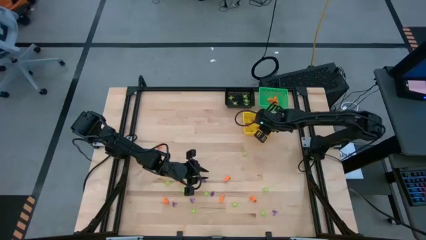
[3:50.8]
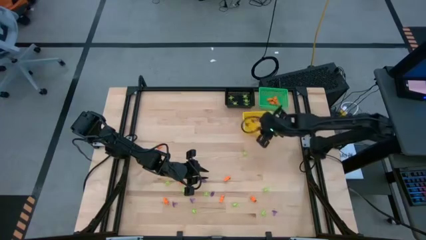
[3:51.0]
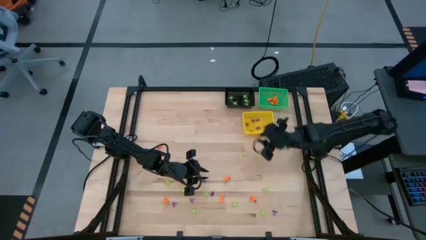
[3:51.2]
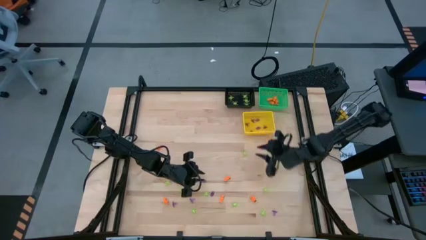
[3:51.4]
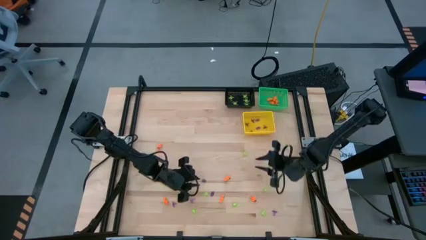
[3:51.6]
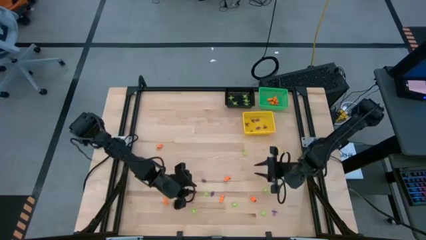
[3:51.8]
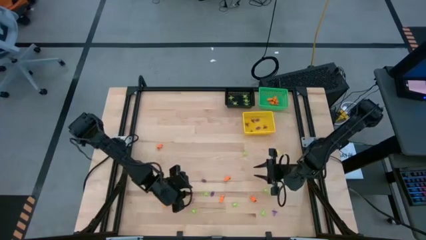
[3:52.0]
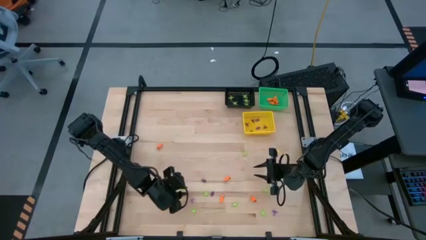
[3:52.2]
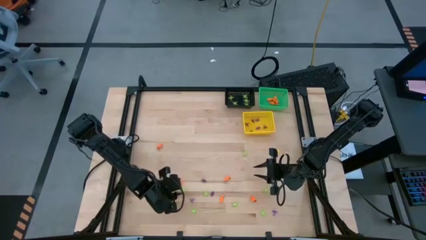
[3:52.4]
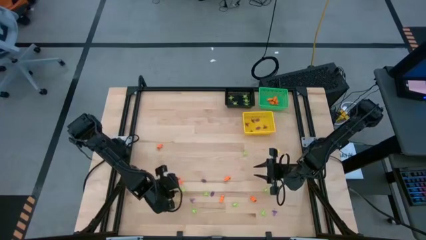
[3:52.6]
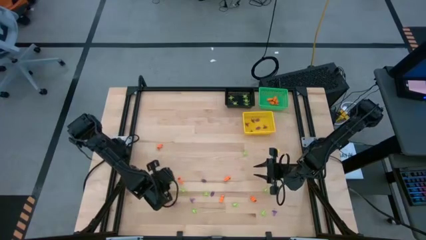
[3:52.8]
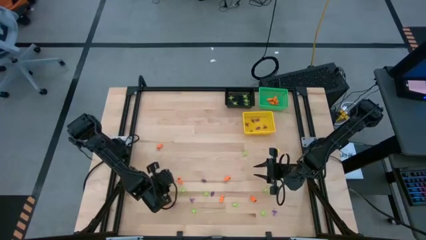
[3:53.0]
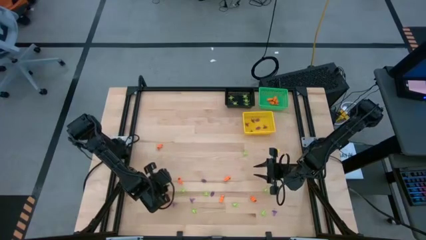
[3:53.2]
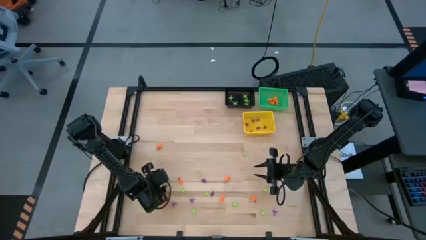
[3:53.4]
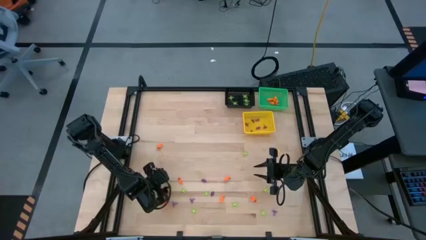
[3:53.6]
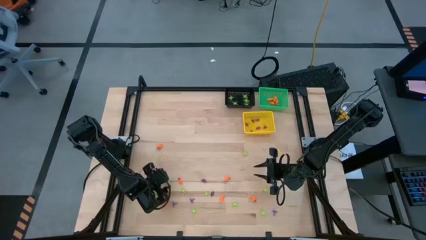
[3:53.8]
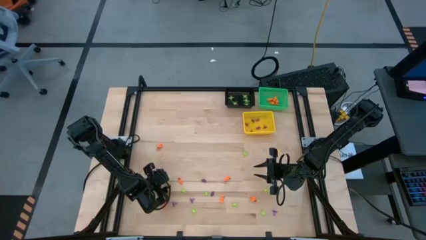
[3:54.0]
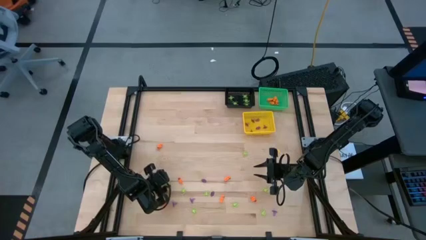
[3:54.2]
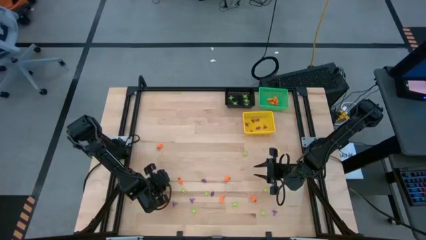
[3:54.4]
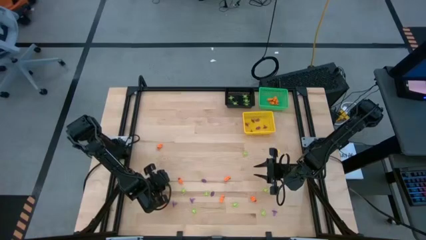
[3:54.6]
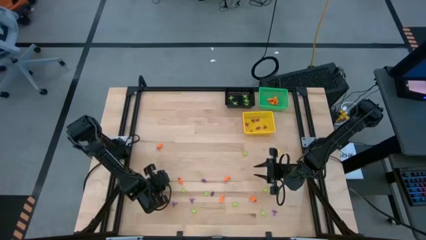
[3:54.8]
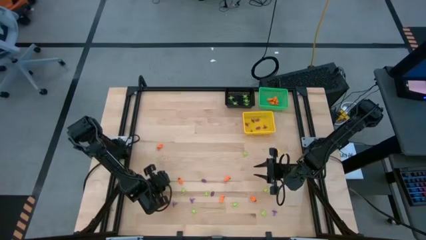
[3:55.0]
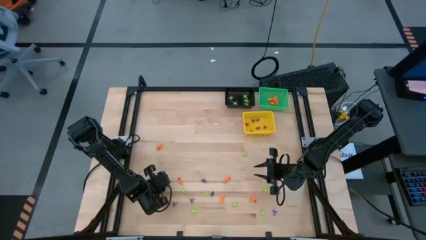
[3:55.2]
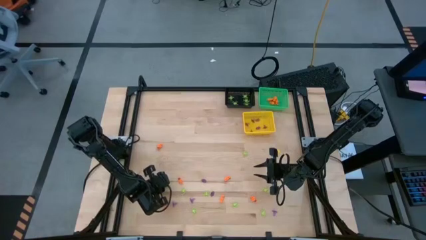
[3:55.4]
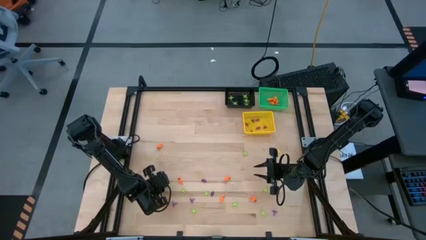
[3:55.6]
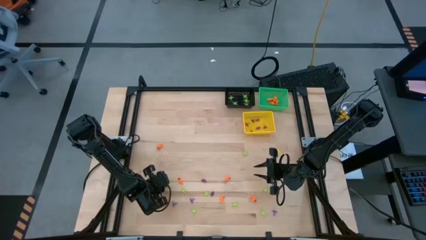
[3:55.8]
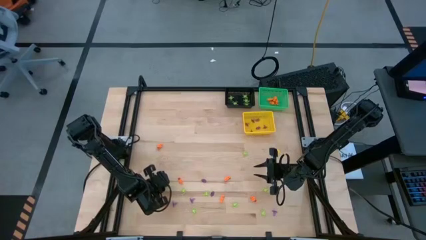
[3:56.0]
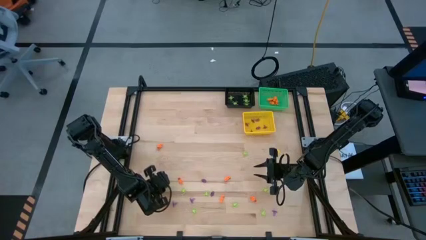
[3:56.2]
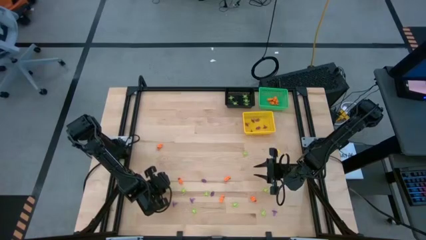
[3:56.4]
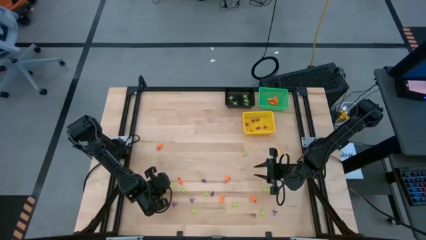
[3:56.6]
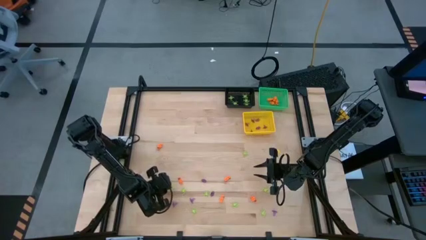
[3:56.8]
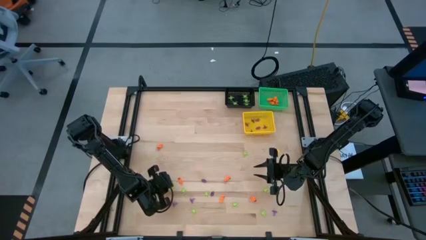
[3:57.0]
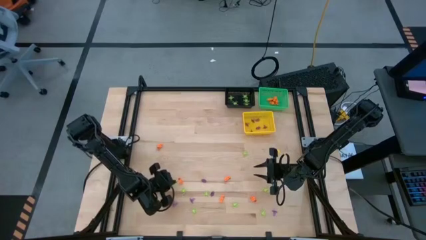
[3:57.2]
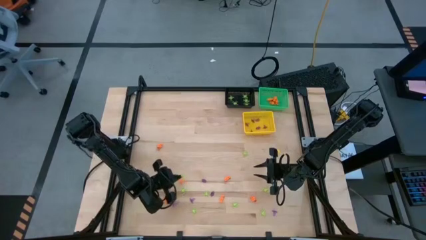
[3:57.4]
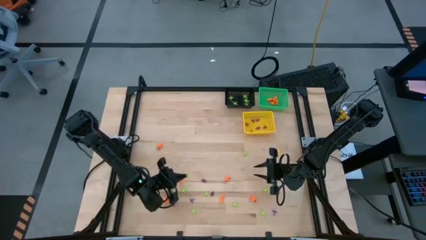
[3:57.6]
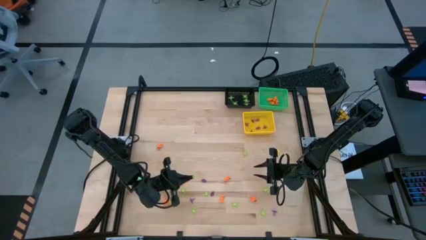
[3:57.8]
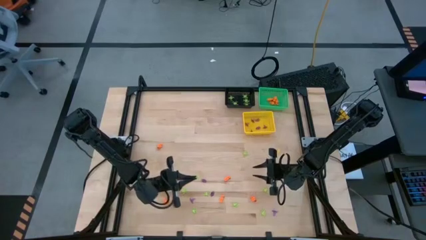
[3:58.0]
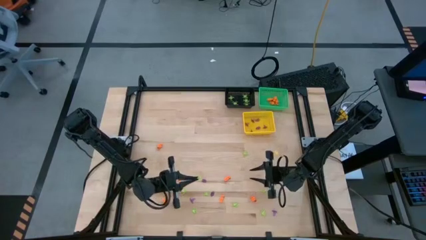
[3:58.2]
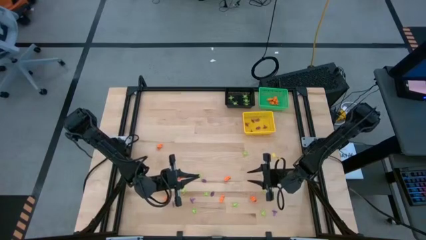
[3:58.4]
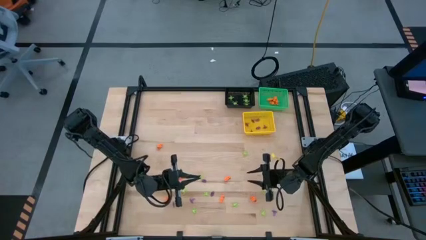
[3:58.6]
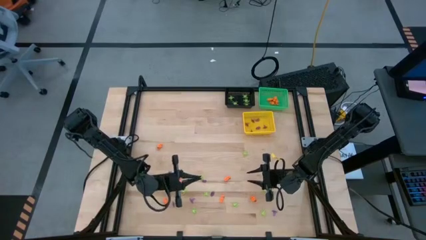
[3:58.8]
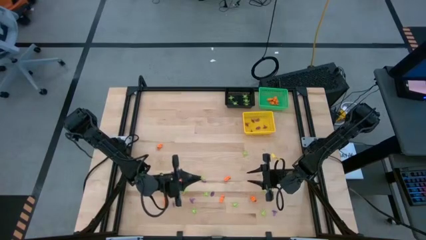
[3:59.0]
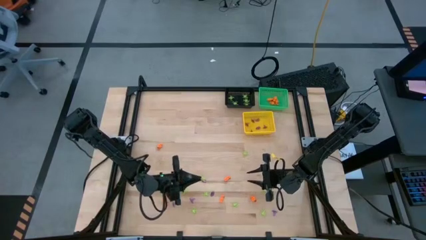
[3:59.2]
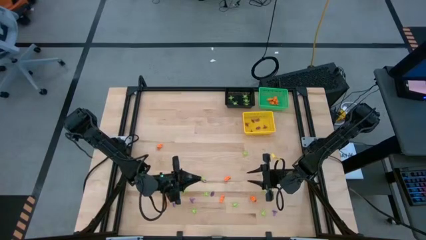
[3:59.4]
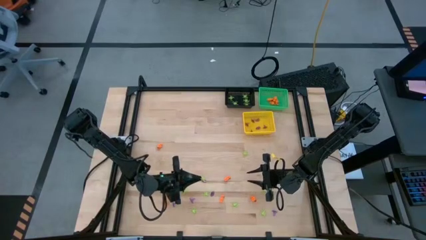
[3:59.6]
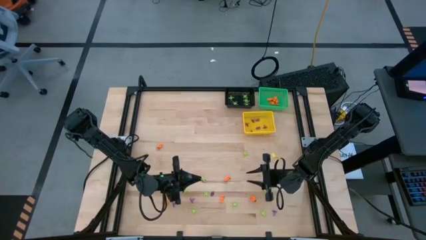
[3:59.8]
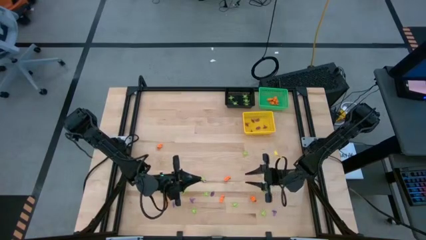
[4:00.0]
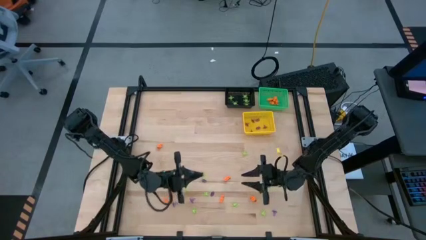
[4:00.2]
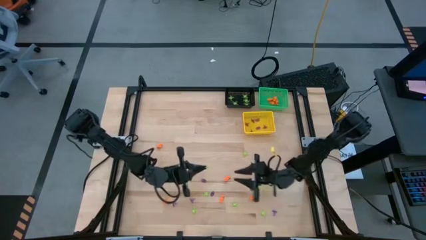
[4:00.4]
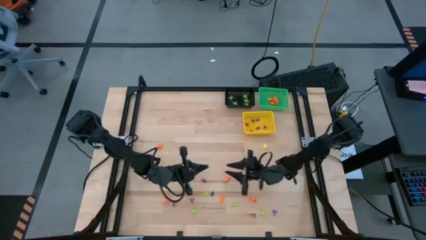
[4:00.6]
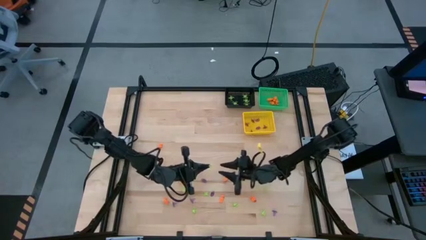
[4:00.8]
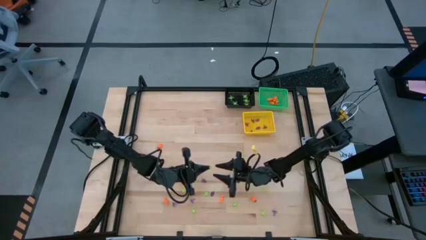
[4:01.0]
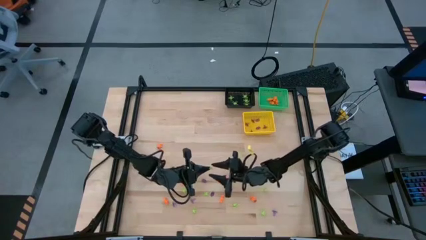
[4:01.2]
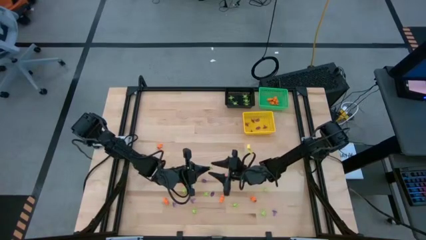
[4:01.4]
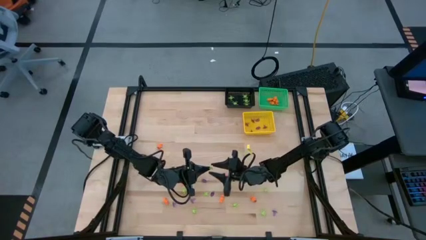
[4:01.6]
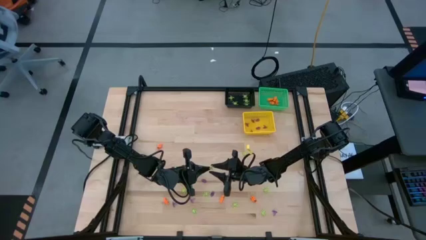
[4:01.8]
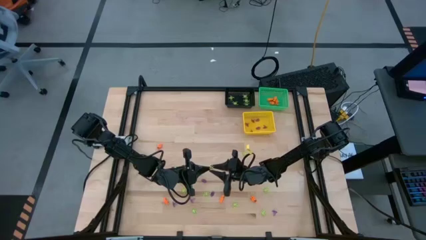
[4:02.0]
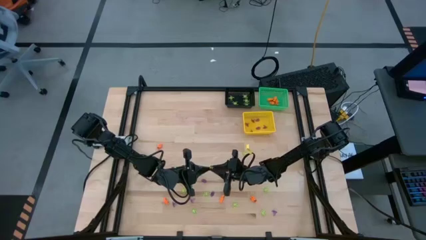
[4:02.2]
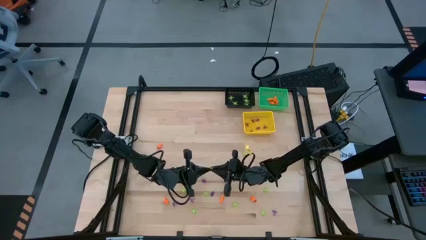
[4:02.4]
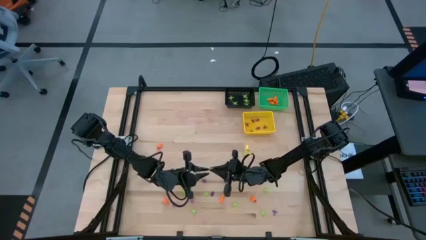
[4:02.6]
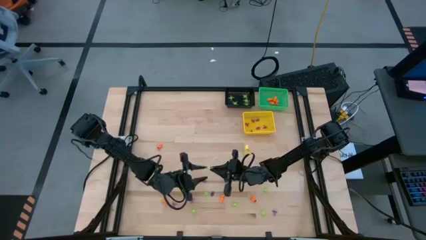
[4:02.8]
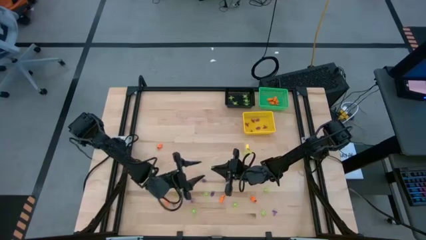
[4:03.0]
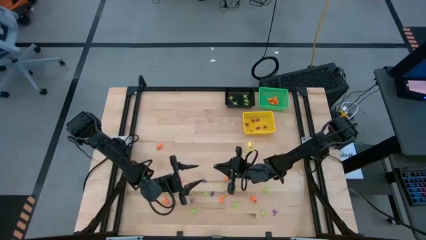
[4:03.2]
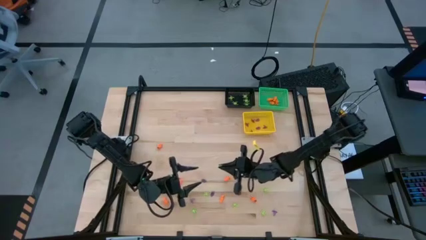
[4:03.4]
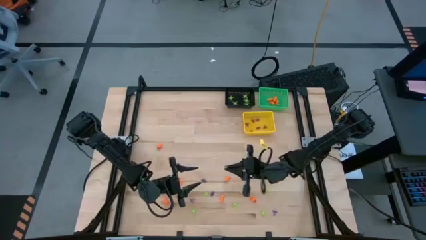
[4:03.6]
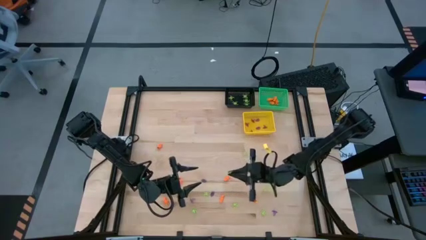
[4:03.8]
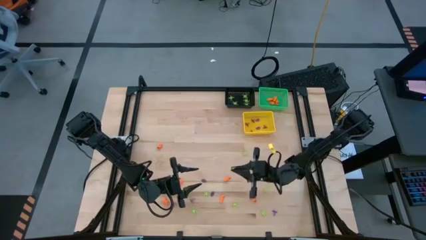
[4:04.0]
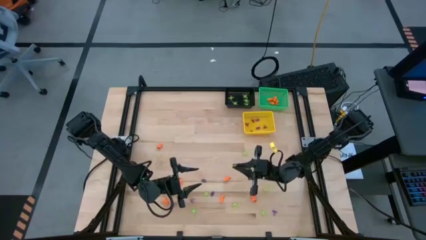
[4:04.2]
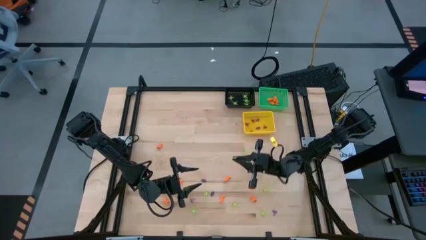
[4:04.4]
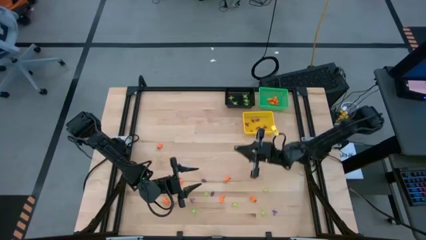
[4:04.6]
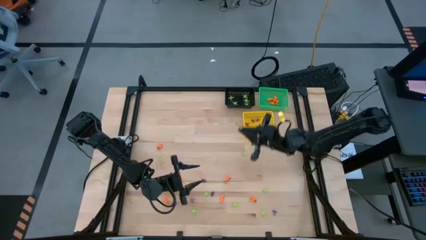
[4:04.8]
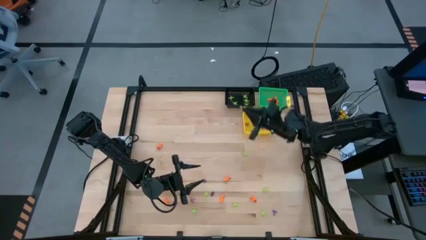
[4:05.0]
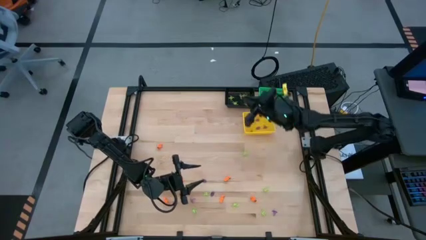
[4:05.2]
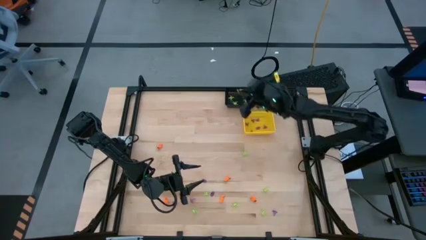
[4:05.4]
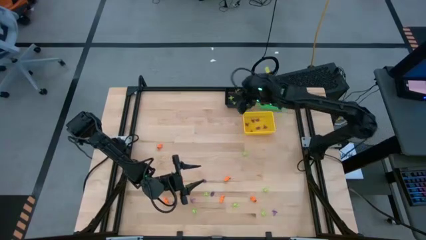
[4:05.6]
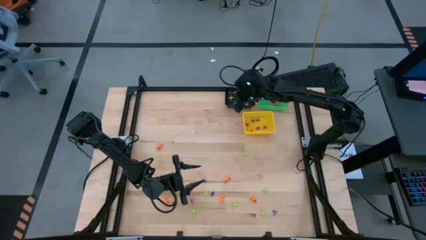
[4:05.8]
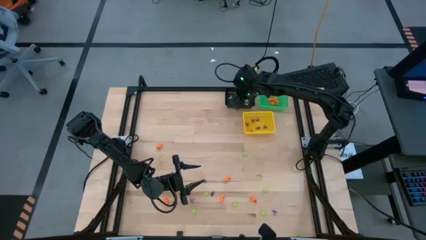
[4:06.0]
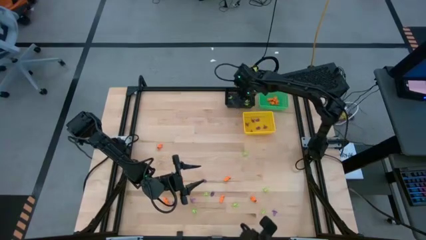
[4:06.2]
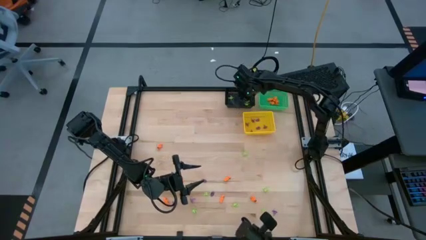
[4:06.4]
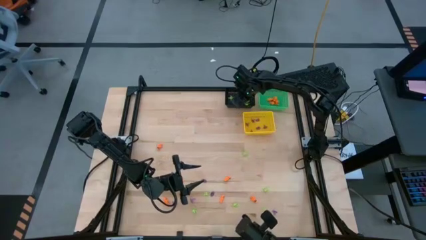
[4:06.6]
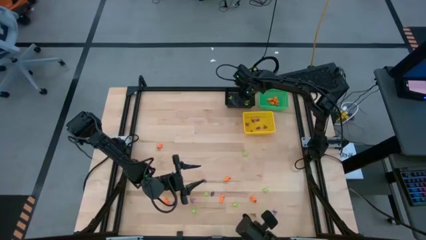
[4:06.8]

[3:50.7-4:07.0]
Task: Sort Halloween decoration
Put the green spider toy into the black basket

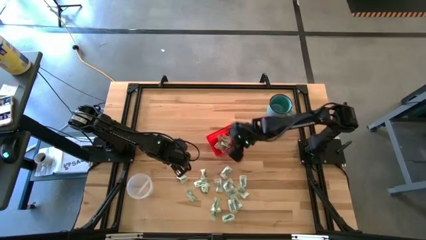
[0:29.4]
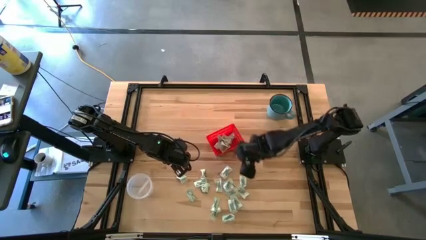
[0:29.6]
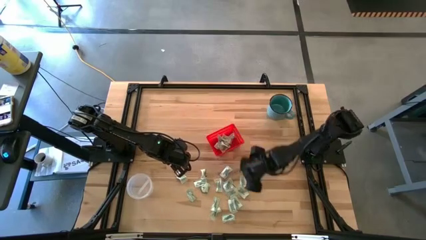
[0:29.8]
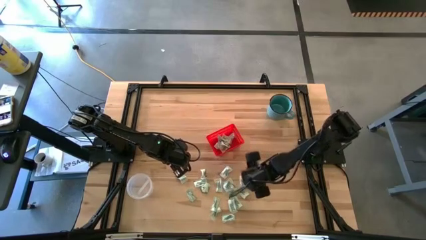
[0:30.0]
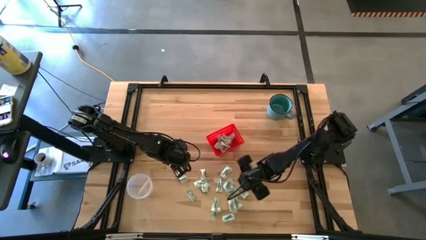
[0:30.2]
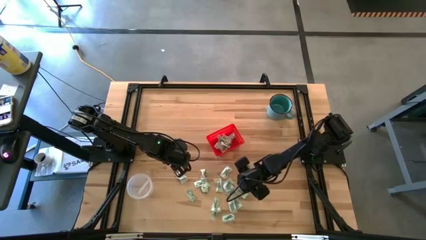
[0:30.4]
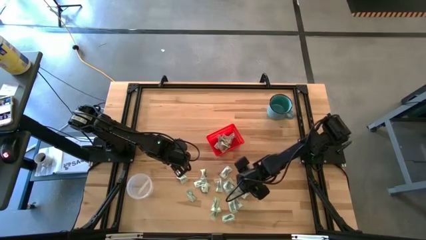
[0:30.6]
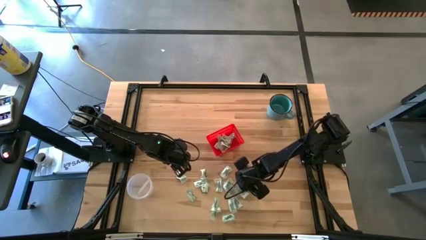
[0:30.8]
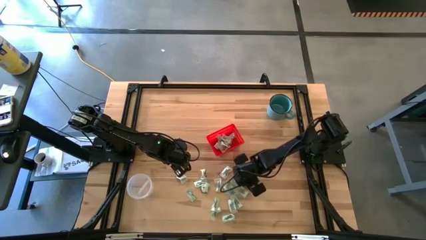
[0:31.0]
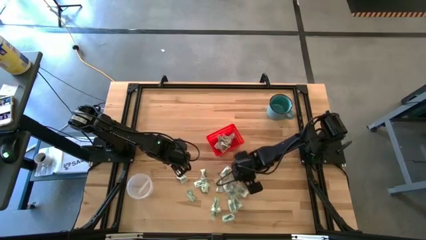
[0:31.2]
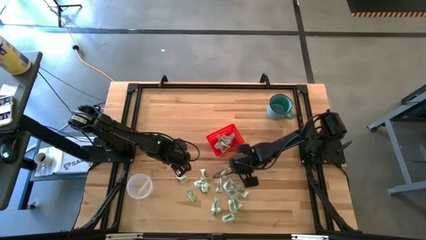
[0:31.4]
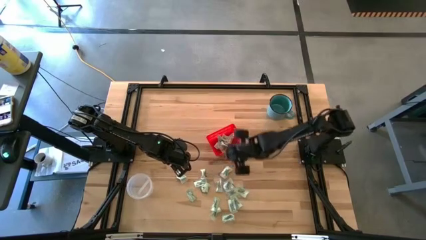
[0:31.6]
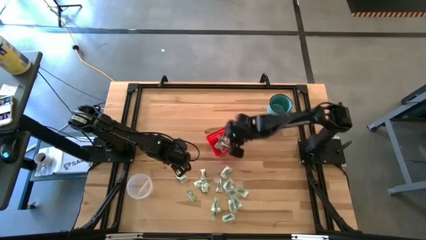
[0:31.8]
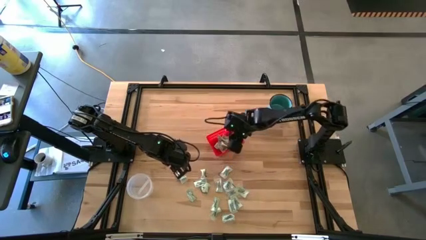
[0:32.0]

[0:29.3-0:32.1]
Task: Pick and place items into bin
Put the stevia packet into the red bin
